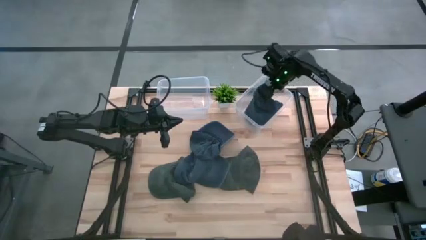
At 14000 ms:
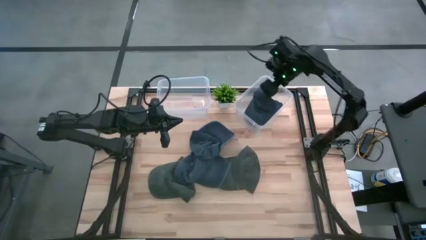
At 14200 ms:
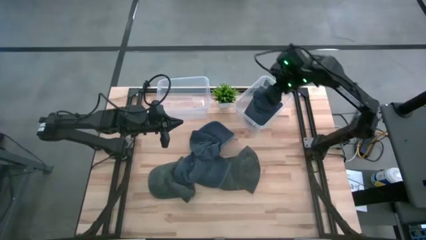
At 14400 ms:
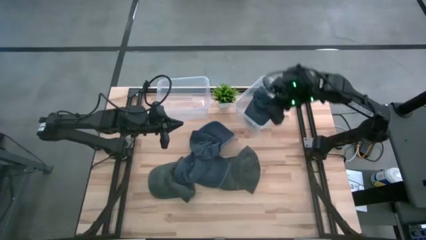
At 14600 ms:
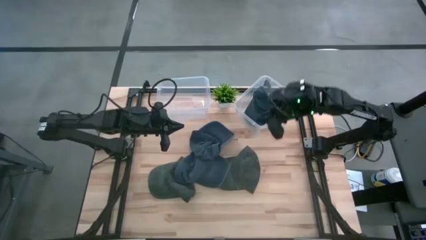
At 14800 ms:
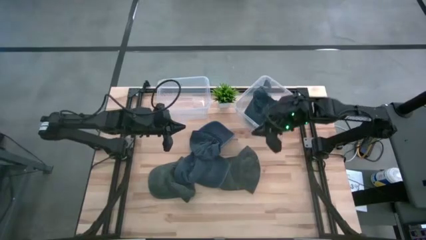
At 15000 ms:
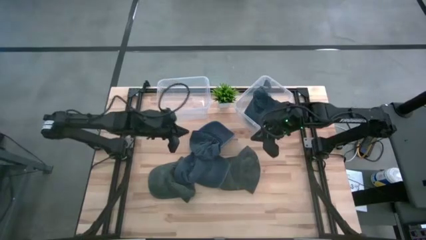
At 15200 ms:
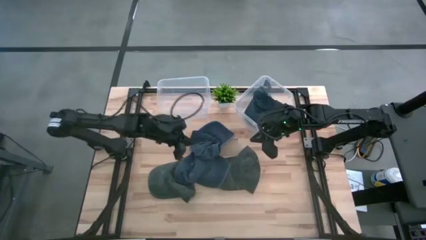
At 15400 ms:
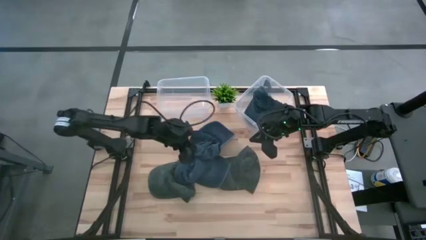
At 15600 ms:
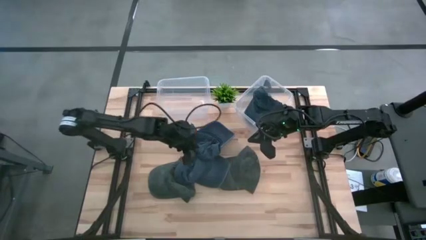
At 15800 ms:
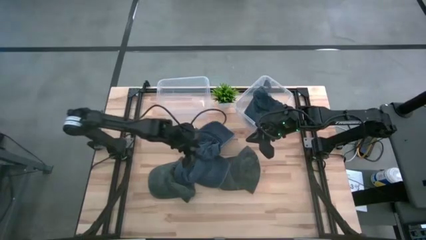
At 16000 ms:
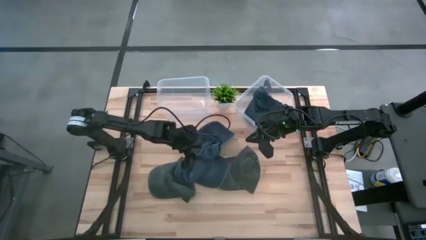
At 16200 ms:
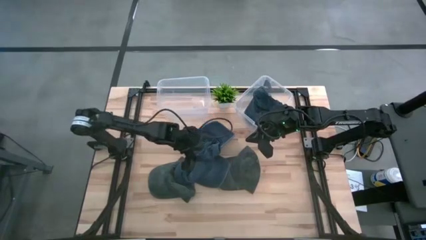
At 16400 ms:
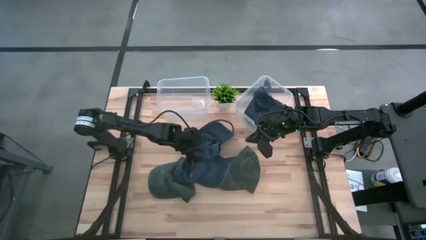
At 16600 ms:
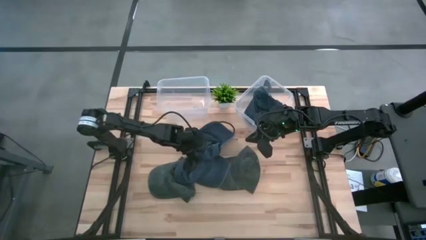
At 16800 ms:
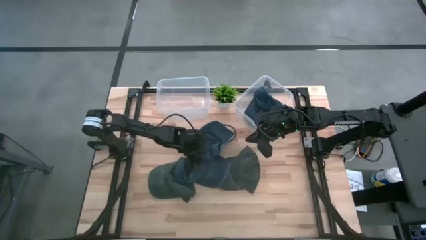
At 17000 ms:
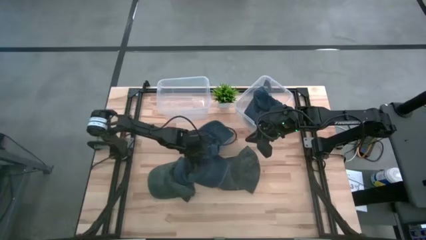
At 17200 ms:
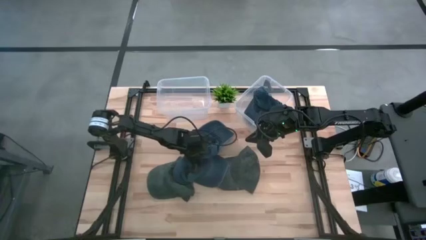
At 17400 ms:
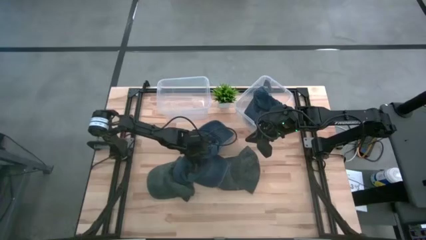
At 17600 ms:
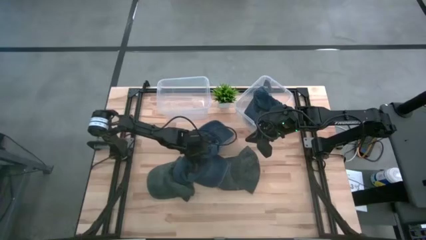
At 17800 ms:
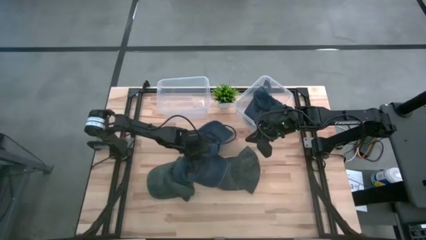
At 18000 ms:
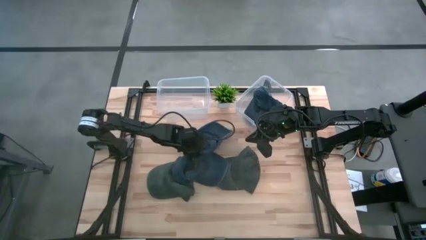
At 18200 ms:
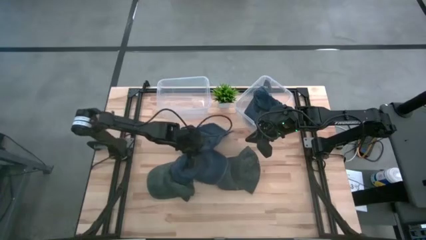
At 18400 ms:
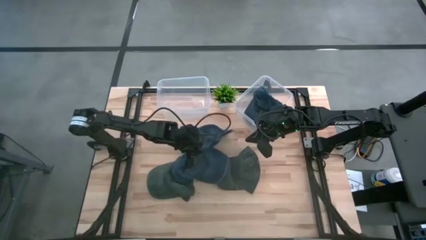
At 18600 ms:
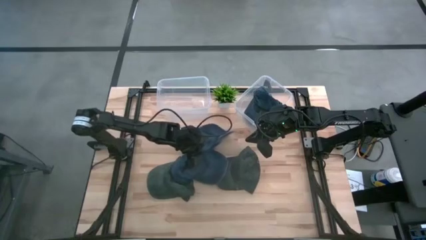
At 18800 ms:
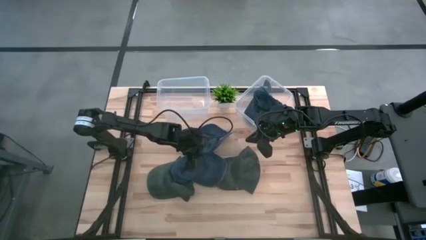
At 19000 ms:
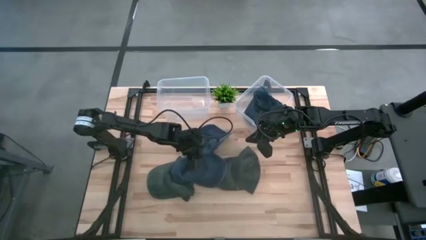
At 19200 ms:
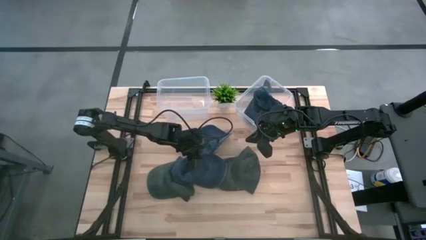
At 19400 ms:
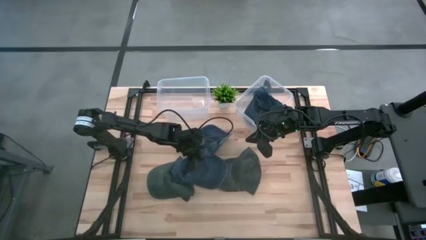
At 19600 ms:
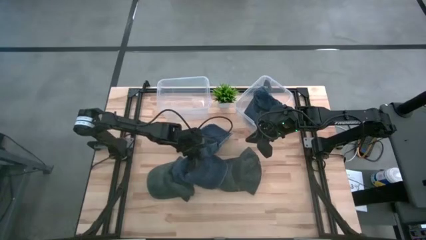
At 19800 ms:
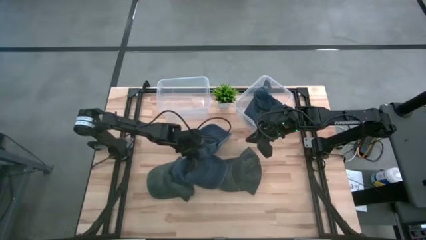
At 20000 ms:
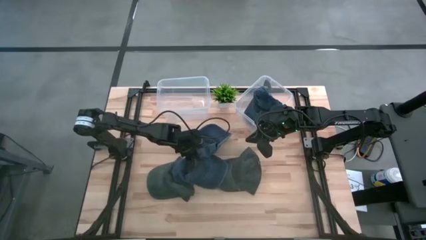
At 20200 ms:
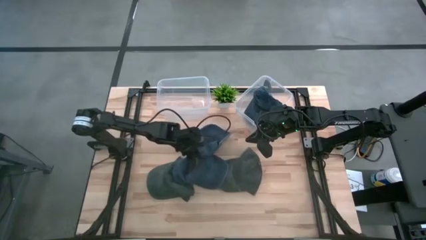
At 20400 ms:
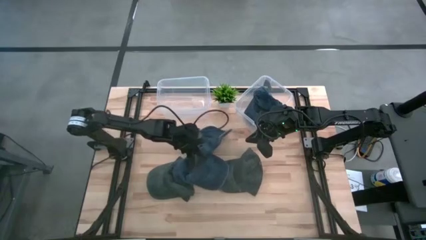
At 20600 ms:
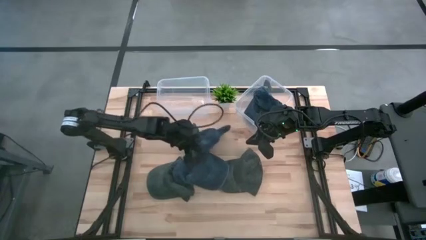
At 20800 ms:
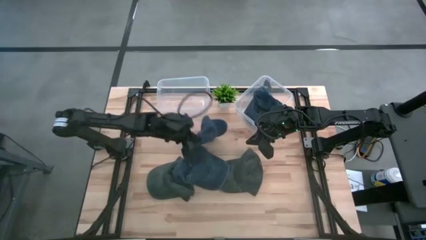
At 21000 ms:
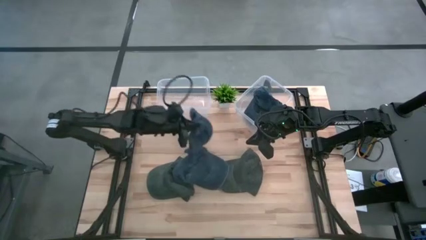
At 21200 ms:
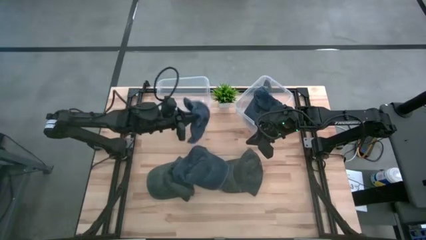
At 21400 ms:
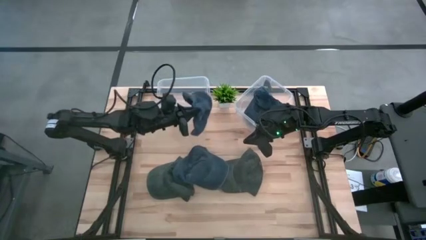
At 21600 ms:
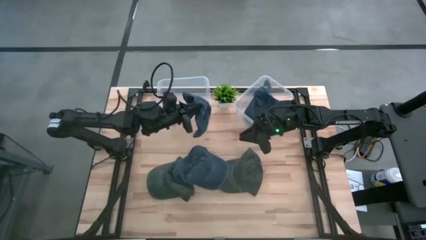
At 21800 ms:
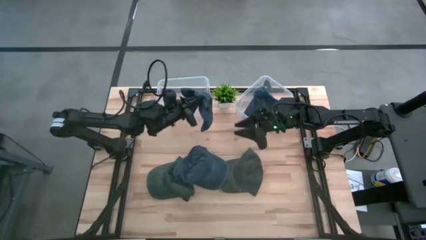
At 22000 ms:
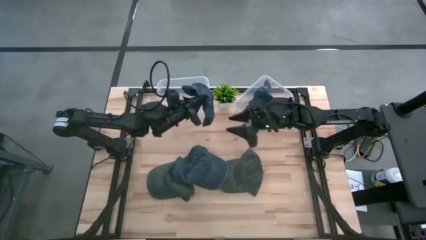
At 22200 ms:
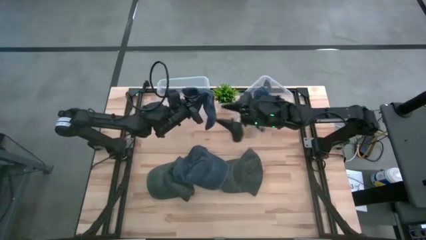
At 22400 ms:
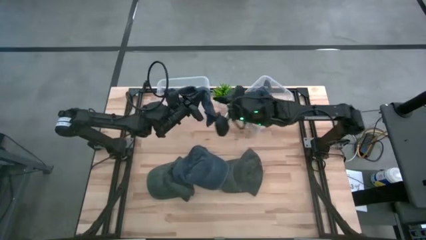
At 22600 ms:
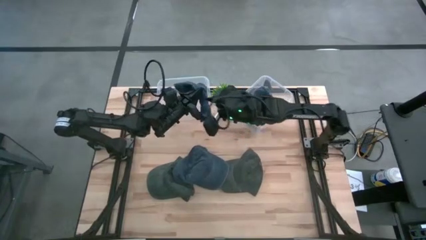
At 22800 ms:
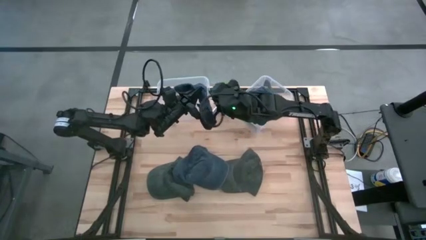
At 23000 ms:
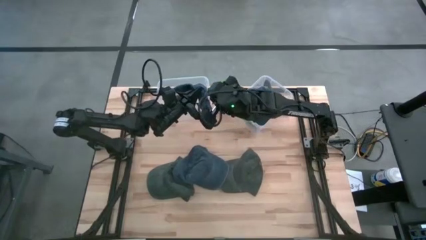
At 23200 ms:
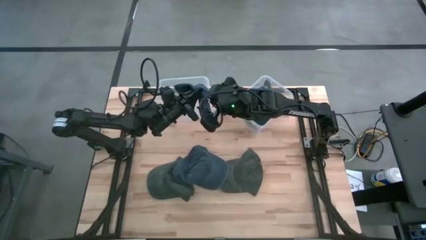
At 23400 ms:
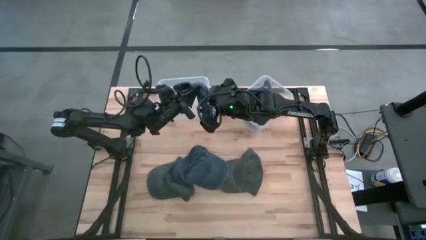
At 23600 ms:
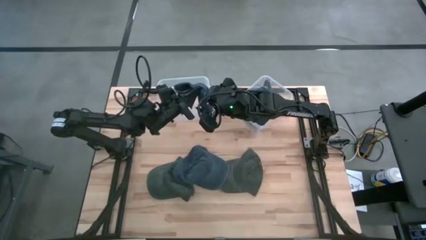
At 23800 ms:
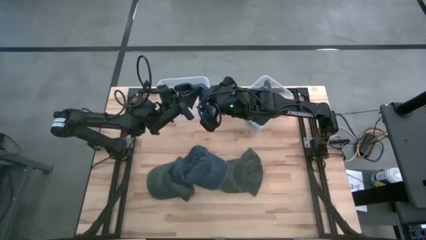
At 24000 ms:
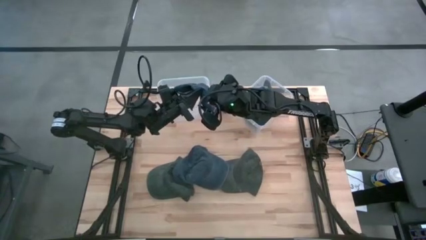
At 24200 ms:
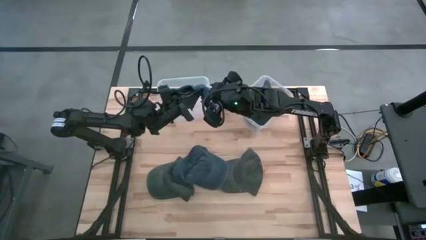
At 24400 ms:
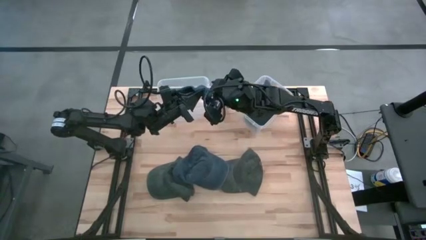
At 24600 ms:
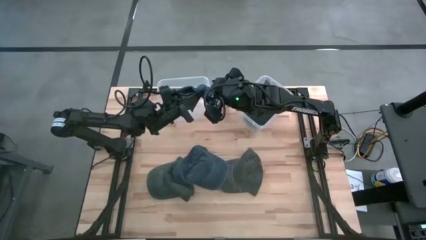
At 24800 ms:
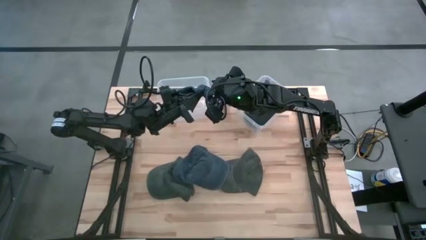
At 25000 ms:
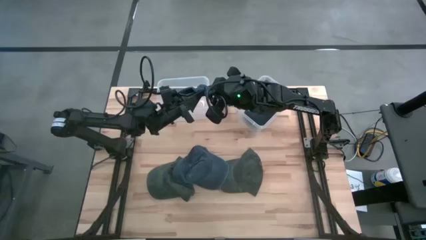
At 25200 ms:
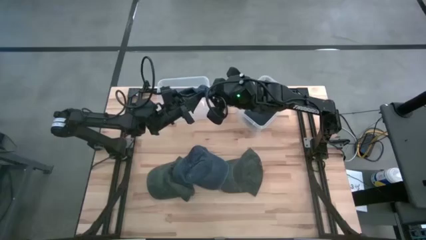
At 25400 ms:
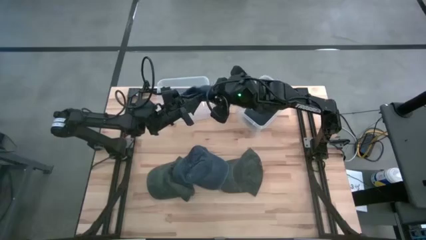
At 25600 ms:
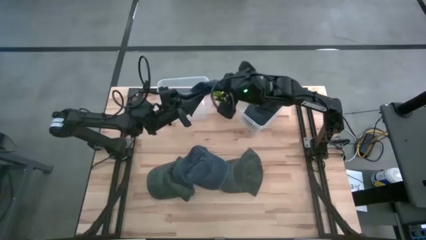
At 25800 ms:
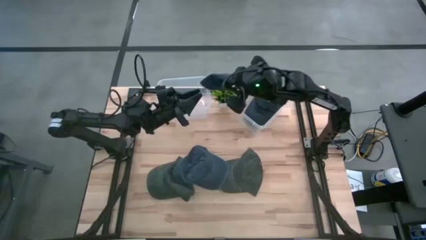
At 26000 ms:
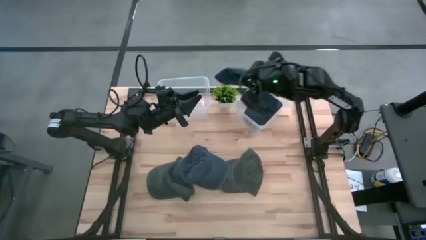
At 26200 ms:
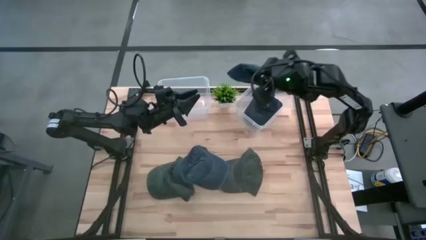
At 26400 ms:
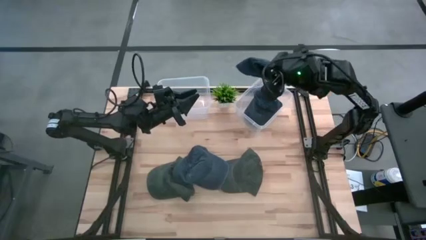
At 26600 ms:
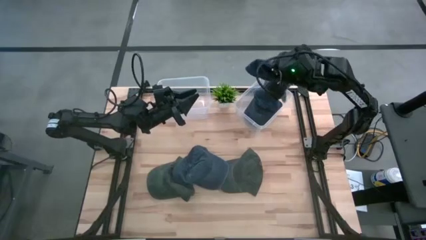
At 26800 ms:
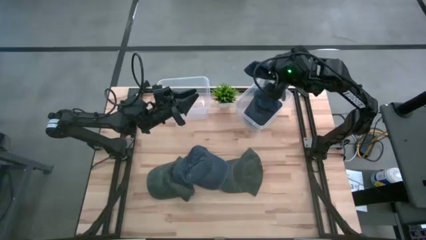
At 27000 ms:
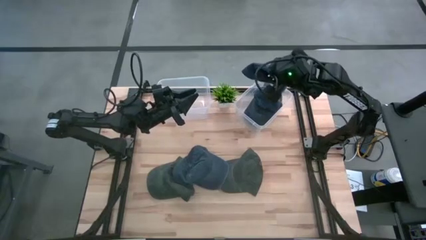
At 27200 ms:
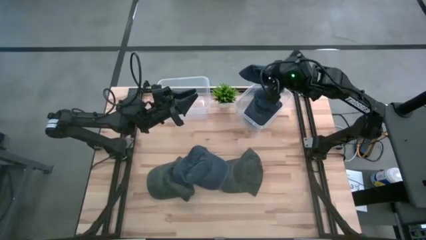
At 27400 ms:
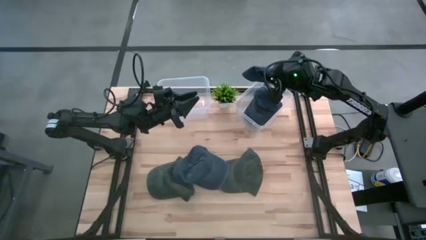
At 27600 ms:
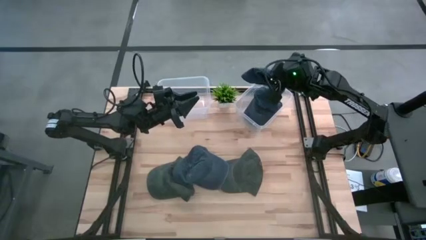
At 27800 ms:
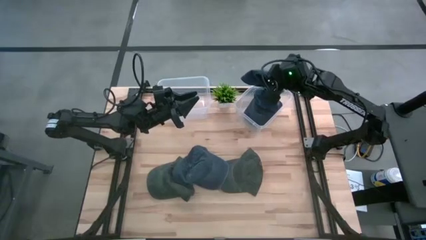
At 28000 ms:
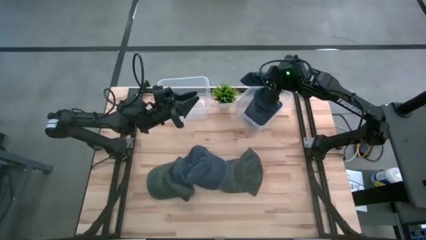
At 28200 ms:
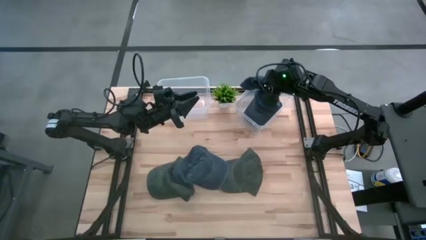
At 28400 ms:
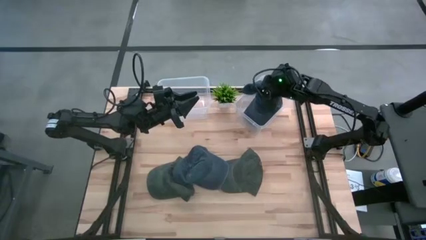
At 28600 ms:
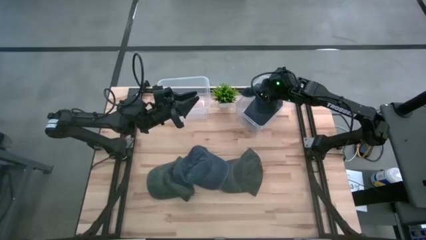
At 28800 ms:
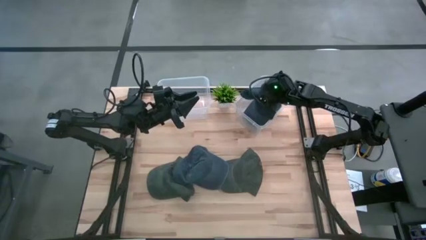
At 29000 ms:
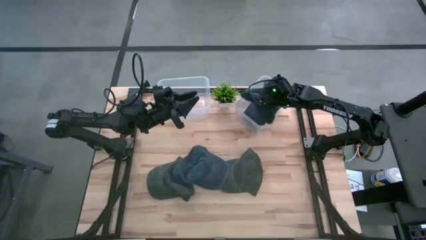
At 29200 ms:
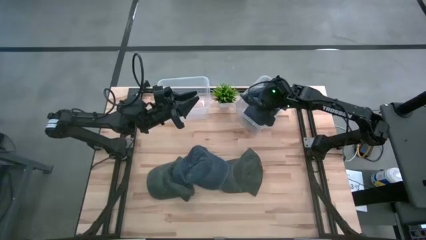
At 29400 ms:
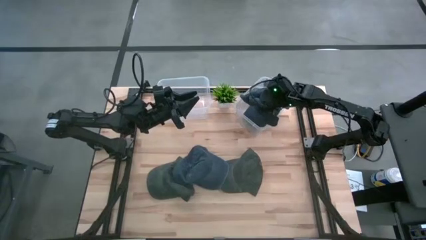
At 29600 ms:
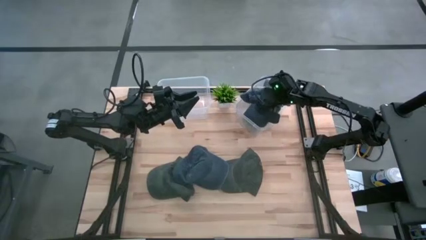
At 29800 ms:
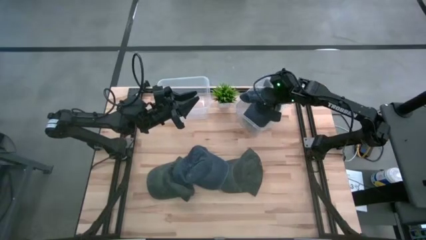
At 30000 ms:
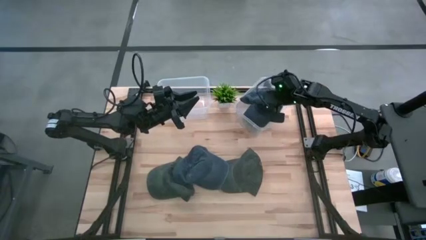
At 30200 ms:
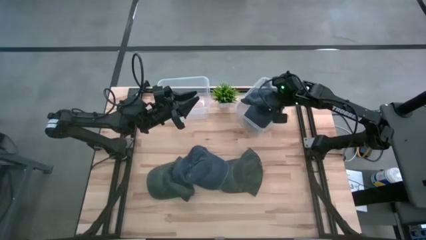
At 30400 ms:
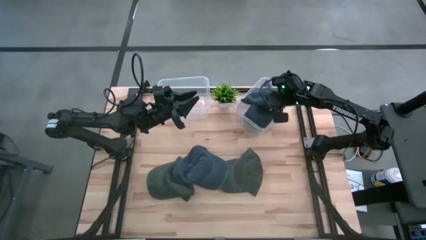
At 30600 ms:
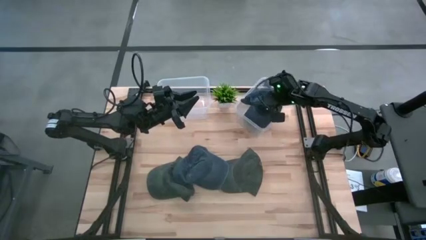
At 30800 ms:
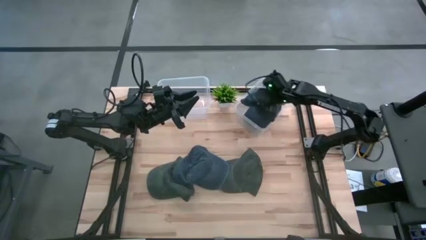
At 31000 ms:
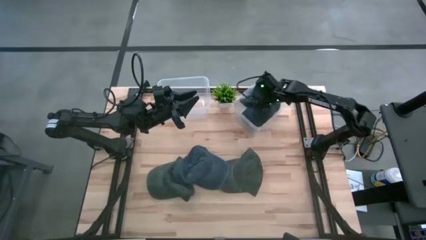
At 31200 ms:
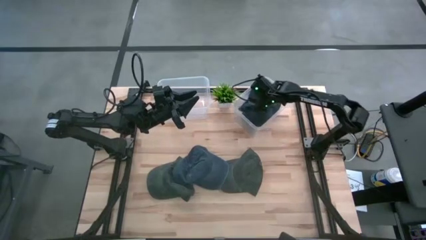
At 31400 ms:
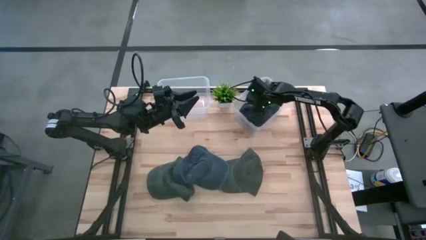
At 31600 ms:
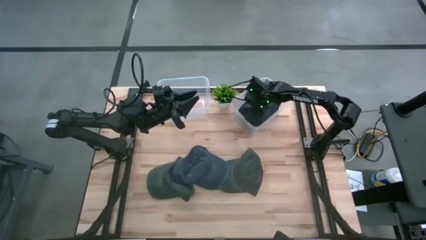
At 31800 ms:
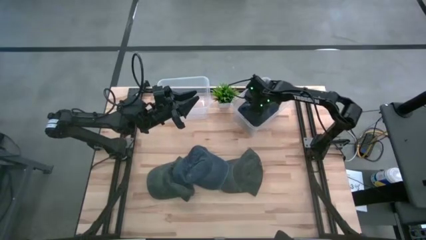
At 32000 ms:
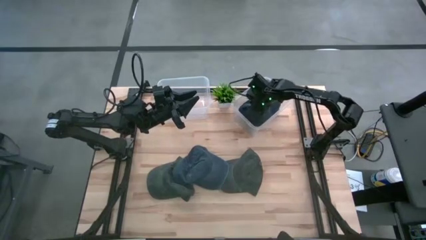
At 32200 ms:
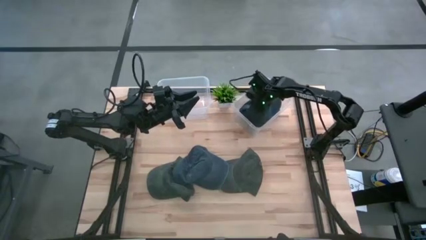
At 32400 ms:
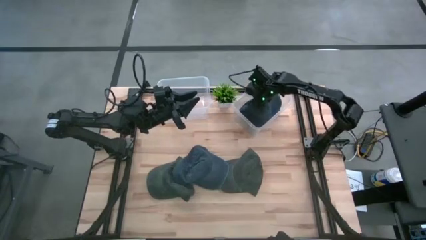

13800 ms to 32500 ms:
Task: Pick and place caps into container
Put the top blue cap into the right transparent container
